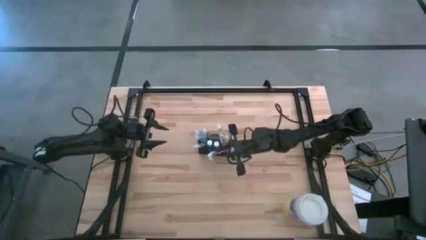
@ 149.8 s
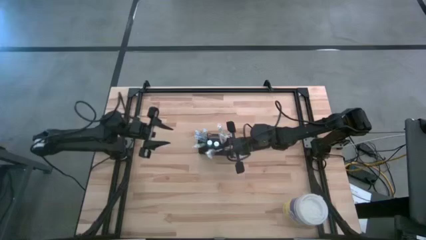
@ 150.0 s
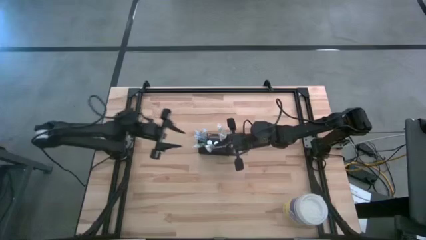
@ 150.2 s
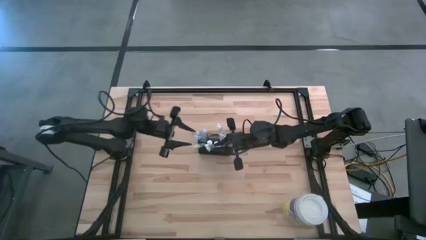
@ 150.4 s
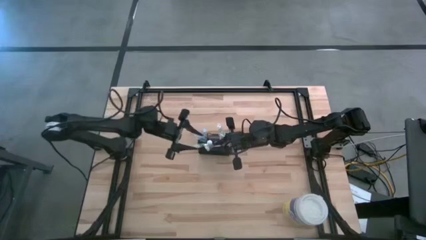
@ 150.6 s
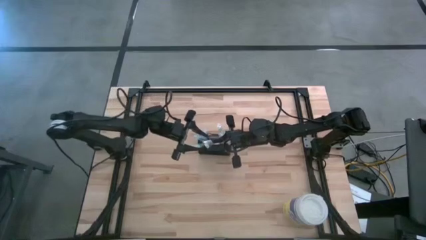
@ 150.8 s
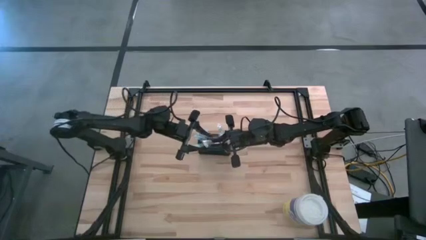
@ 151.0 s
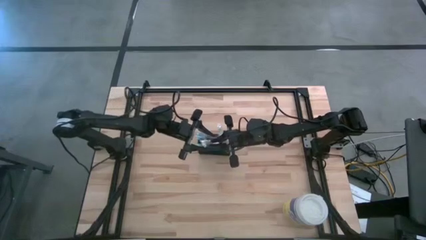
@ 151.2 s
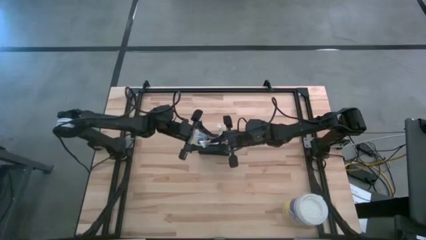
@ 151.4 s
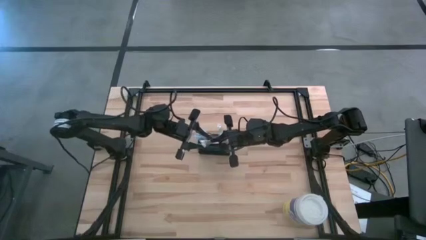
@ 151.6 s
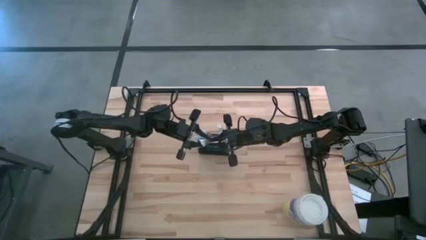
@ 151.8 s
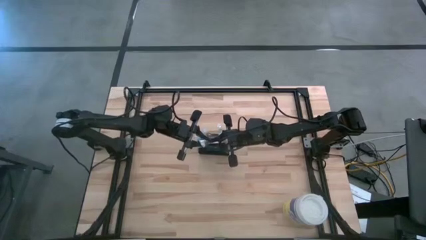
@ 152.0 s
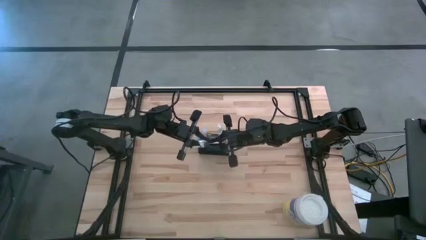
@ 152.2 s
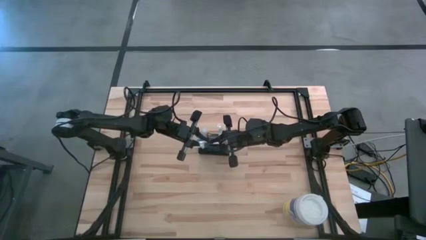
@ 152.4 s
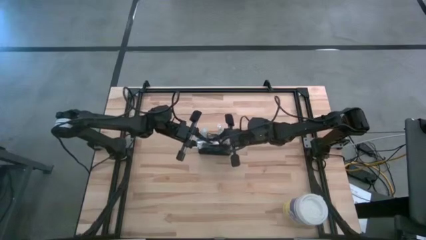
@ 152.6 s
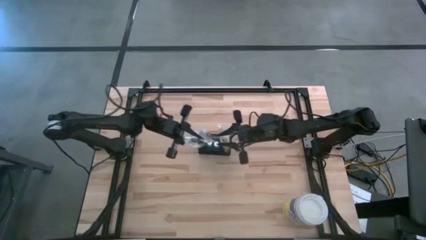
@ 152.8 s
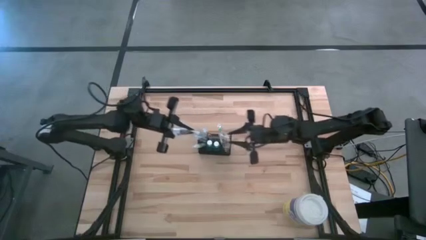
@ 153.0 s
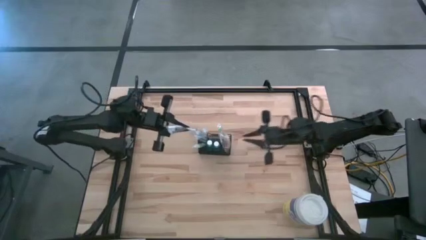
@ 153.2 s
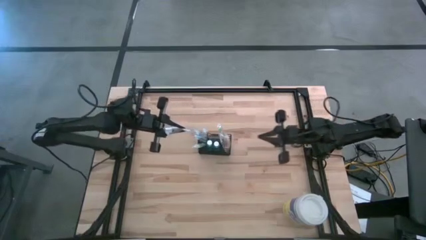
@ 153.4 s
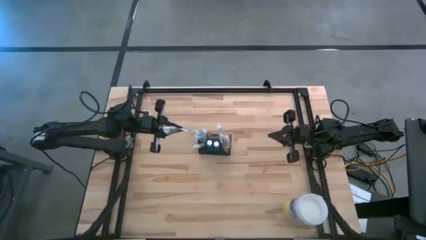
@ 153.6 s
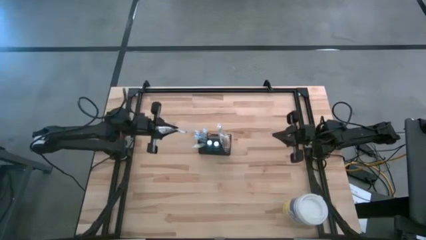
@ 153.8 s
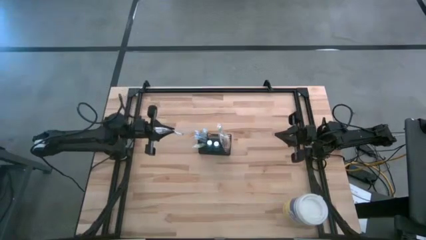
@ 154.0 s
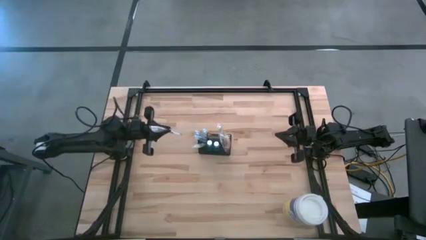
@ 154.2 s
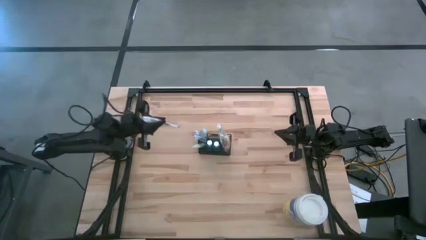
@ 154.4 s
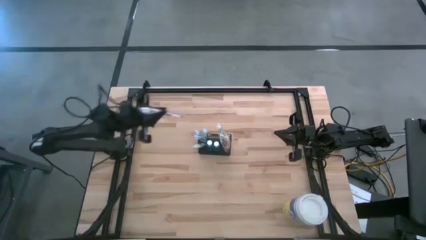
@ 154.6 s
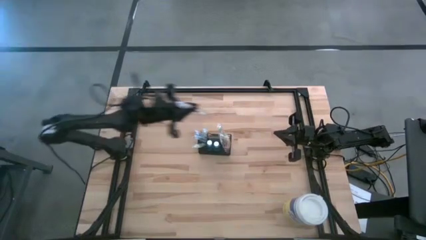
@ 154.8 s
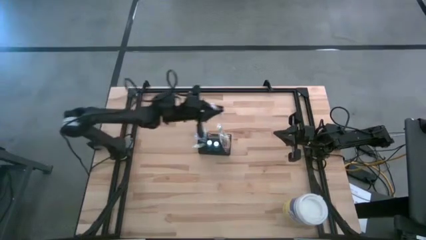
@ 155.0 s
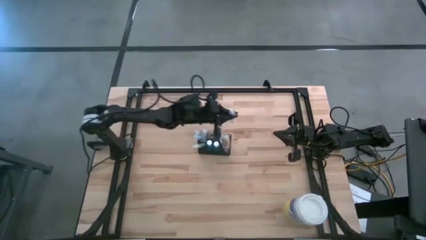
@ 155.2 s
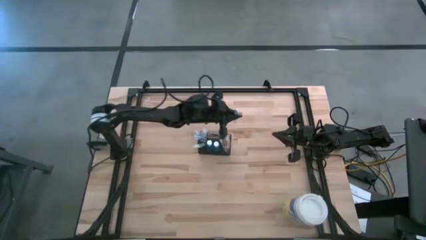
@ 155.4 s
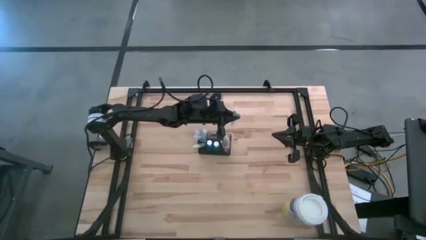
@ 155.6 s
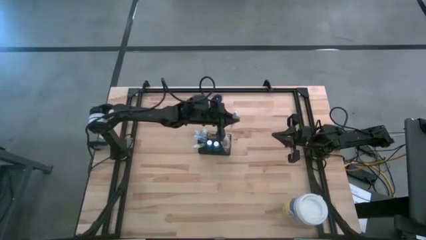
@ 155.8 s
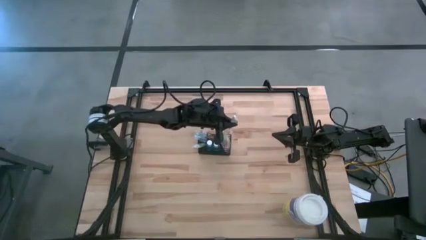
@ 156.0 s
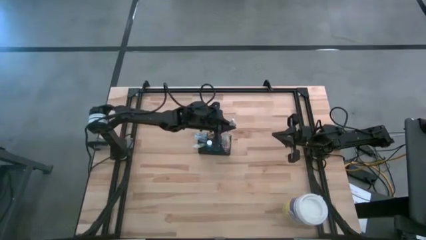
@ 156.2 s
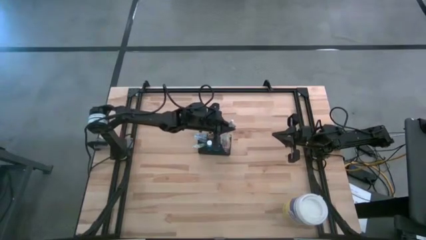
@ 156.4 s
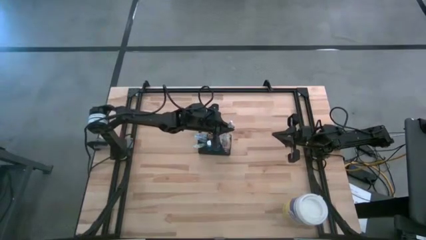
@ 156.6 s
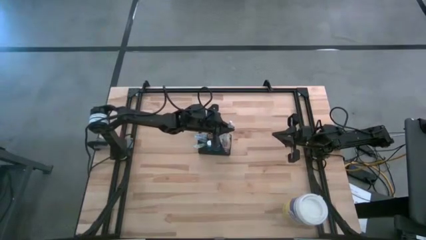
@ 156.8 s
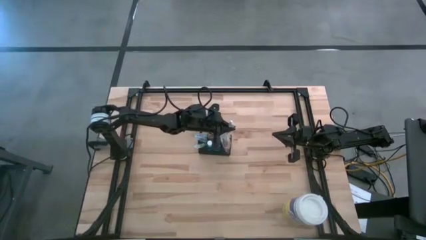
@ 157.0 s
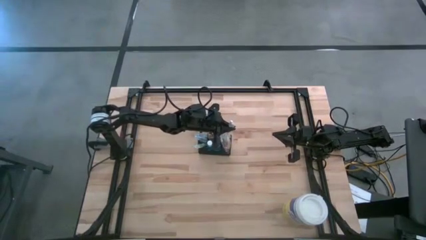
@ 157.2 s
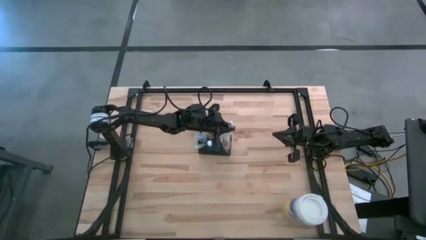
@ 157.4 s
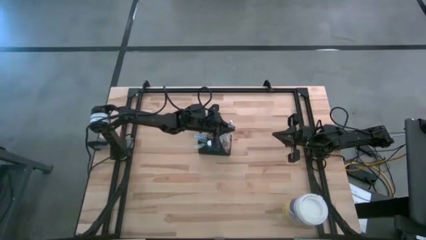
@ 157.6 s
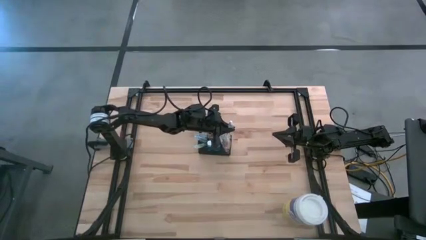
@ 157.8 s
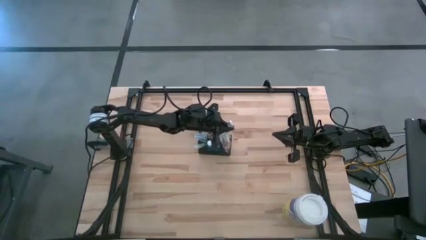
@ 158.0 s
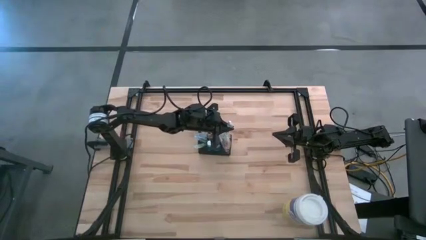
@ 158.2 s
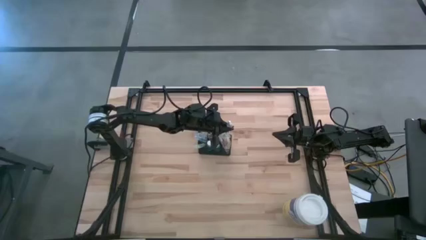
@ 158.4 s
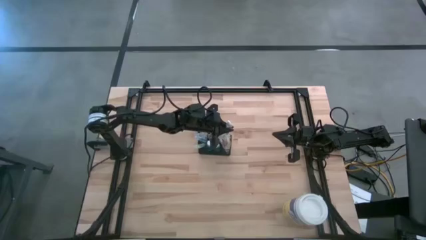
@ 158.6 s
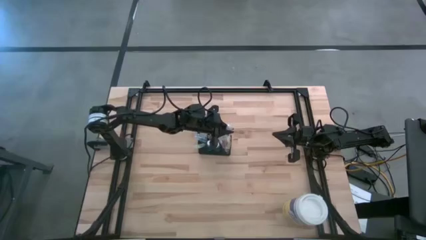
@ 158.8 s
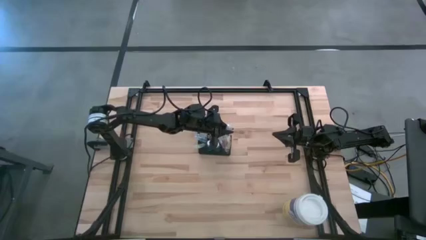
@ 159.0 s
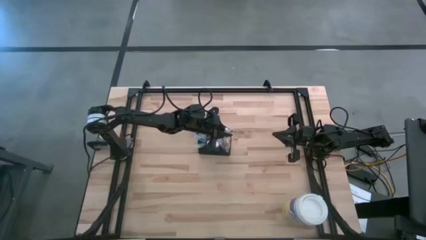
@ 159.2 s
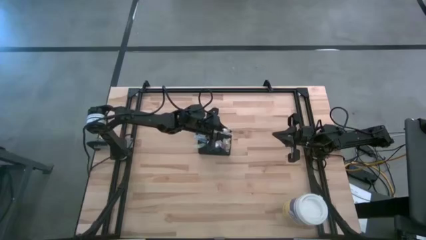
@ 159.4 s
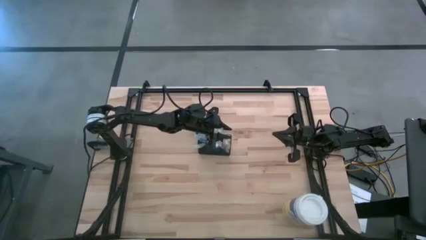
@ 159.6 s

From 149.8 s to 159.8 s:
Task: Pick & Place toothbrushing station
Put the violet toothbrush into the black wire organizer

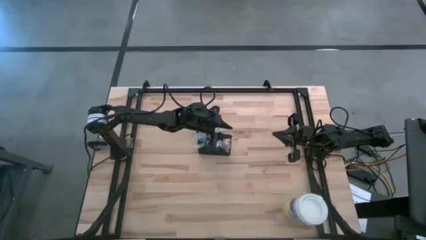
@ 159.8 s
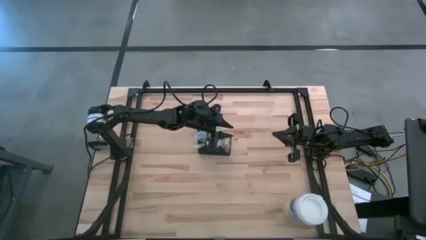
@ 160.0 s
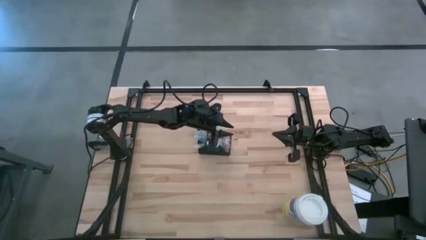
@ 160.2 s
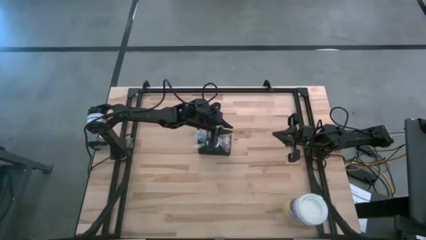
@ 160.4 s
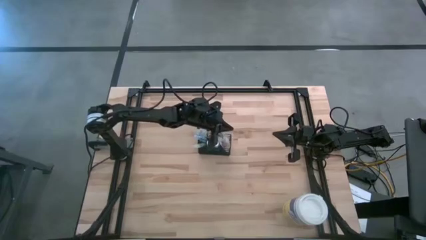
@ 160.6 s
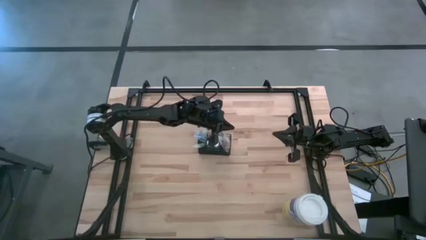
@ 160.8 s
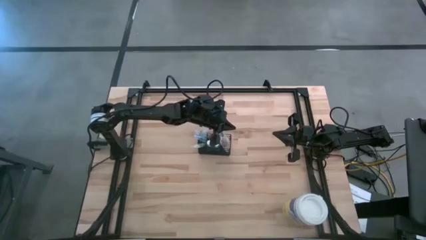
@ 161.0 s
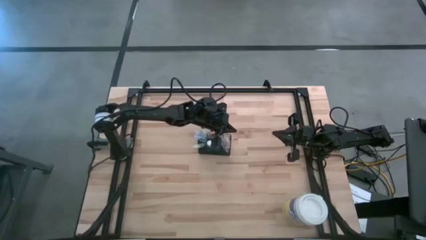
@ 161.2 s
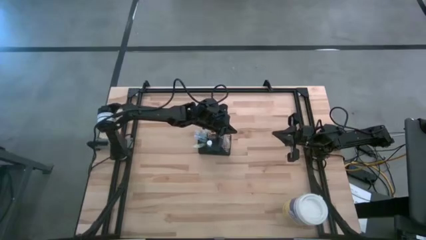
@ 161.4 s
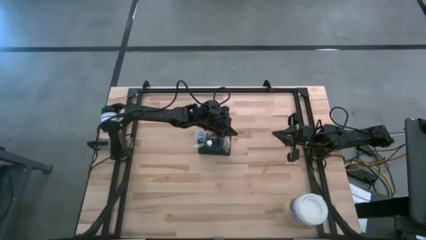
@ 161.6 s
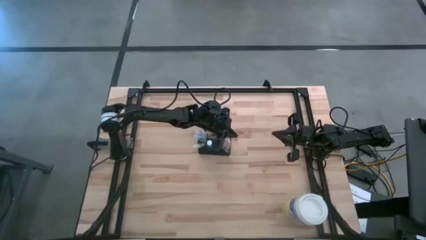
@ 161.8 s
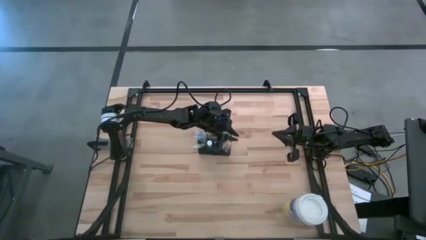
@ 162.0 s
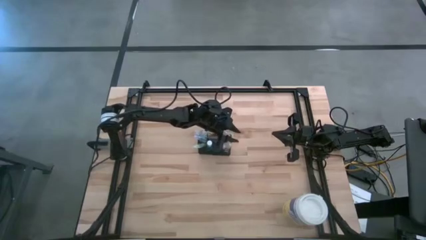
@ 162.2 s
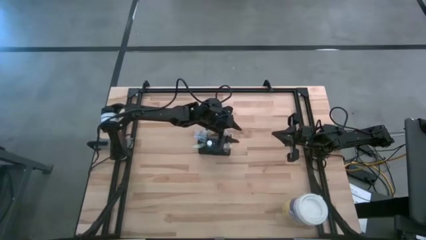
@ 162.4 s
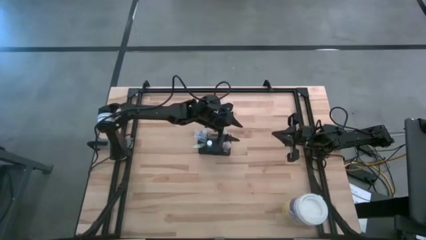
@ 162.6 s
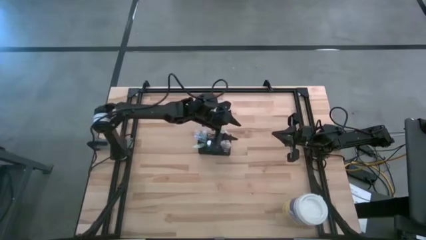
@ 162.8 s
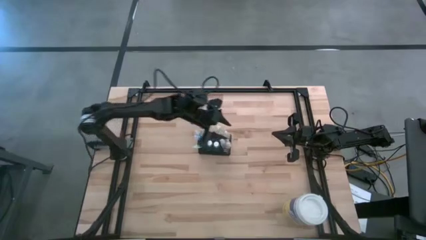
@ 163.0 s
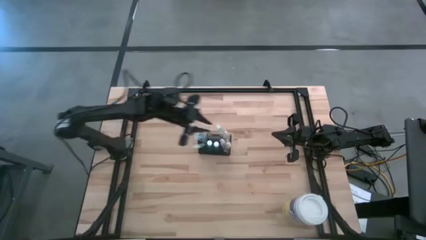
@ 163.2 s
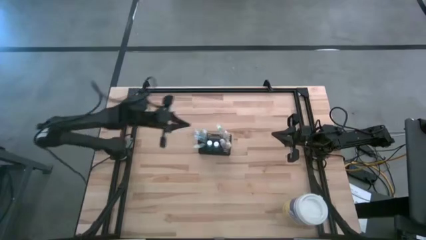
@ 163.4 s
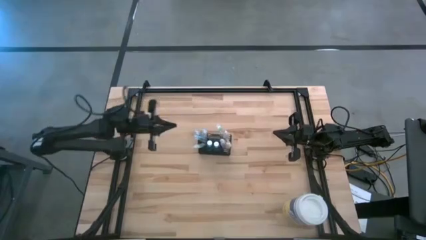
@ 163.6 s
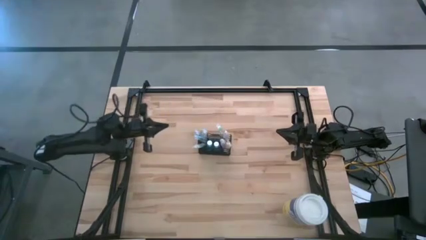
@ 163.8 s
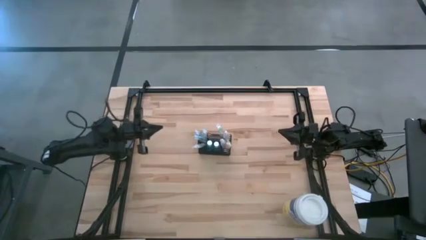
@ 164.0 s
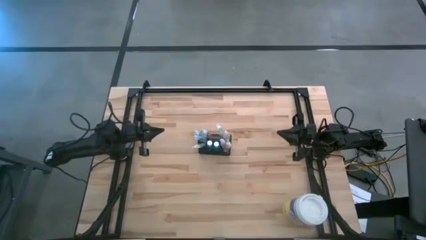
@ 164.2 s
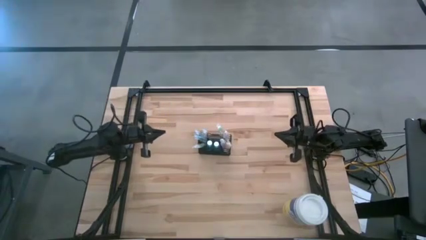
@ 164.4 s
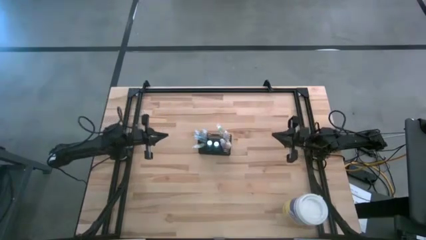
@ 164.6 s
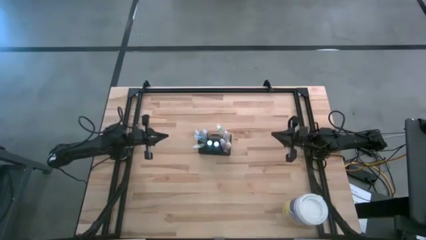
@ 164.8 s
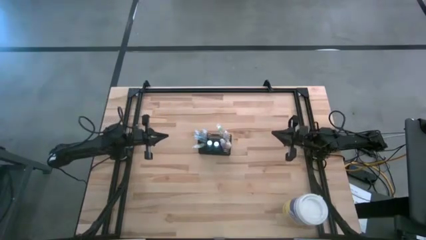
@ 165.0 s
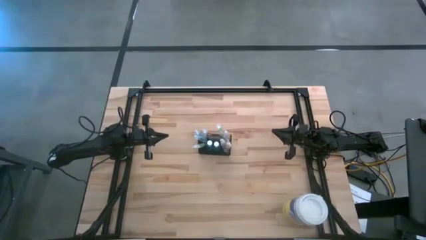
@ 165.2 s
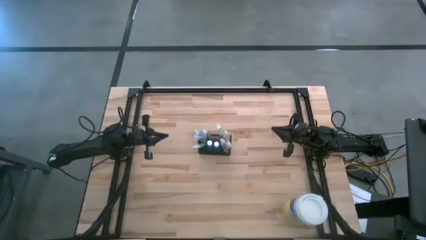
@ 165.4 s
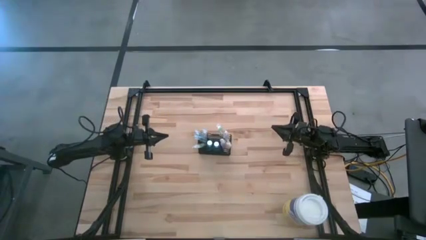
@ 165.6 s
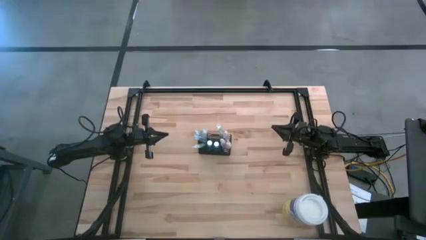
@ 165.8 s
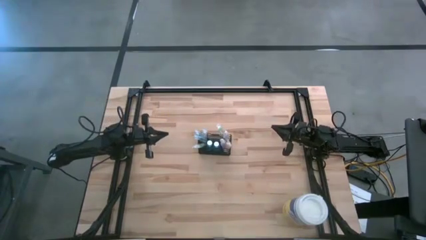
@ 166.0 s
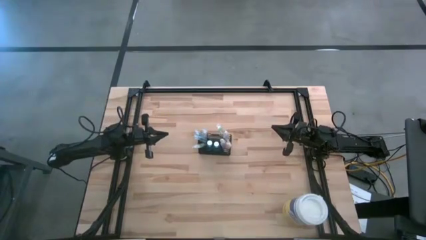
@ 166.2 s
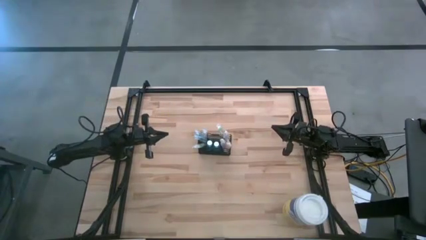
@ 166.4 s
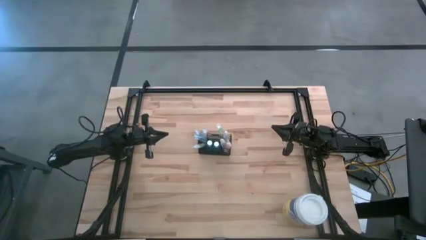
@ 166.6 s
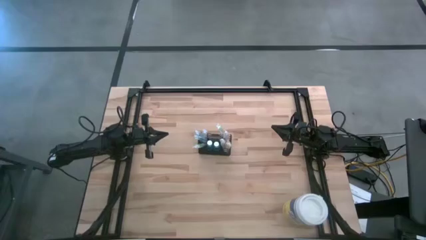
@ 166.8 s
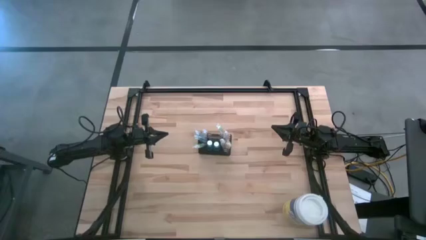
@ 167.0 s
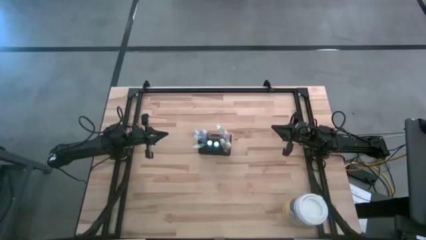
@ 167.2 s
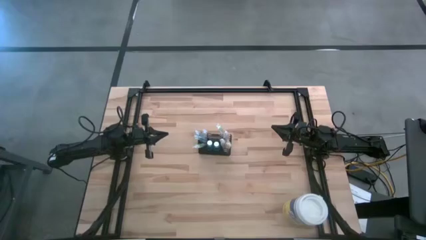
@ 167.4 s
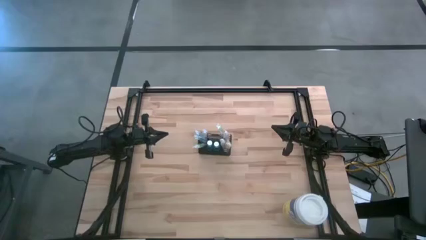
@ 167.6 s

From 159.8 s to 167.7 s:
Return to Home Position
